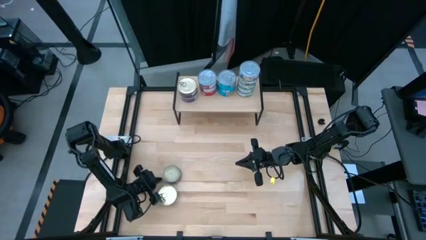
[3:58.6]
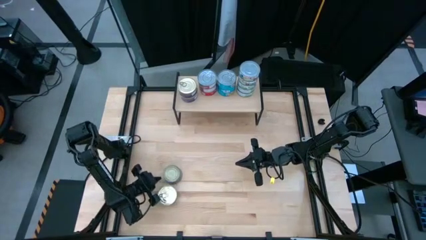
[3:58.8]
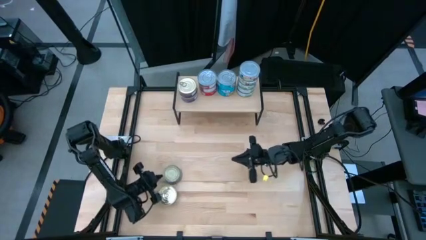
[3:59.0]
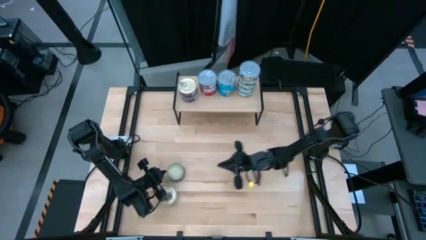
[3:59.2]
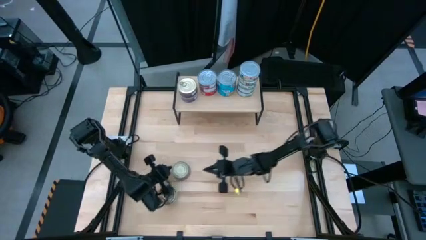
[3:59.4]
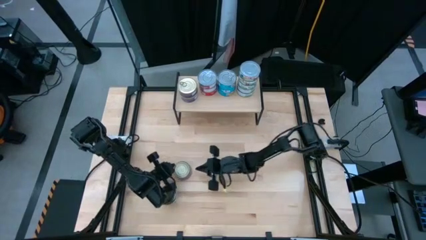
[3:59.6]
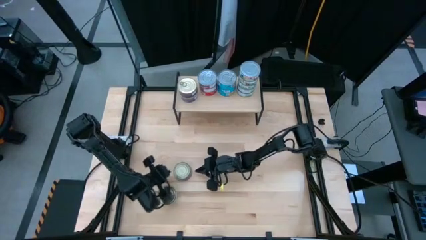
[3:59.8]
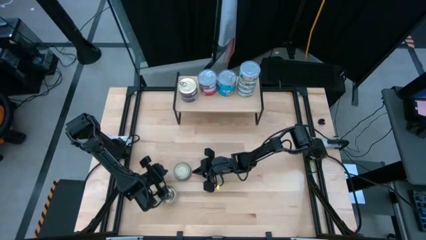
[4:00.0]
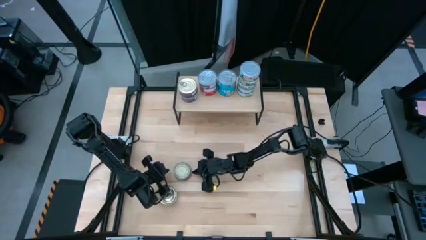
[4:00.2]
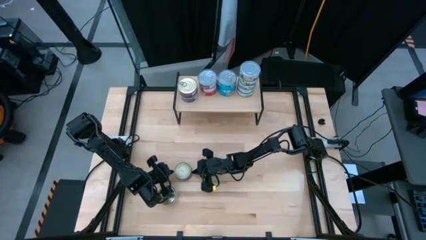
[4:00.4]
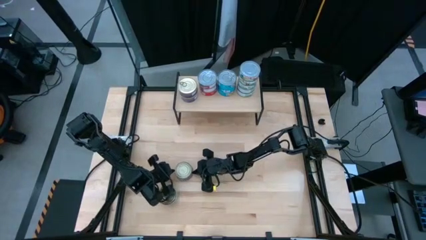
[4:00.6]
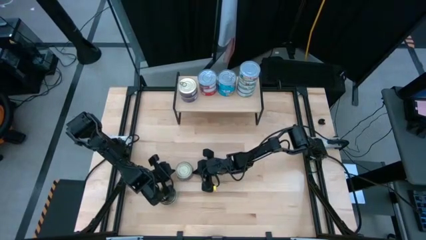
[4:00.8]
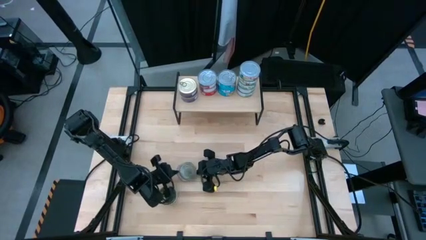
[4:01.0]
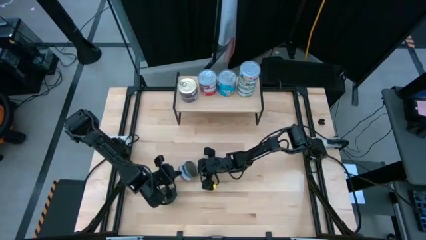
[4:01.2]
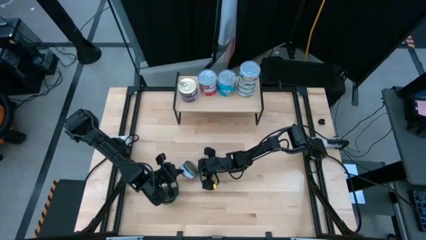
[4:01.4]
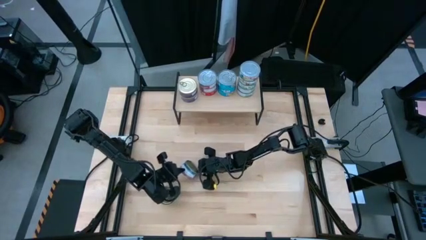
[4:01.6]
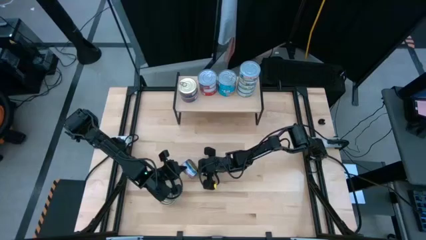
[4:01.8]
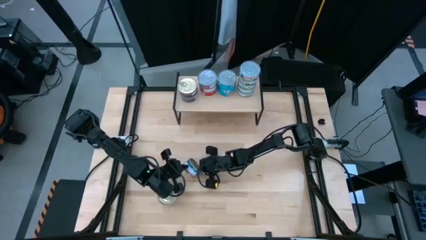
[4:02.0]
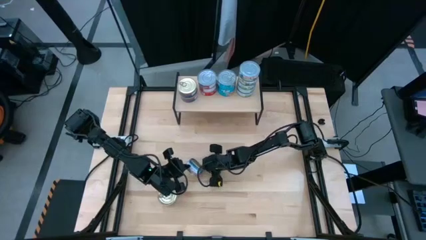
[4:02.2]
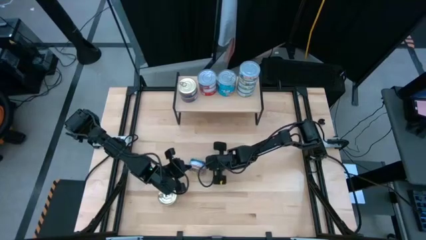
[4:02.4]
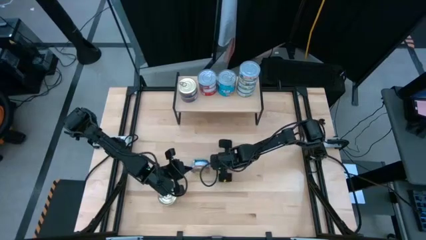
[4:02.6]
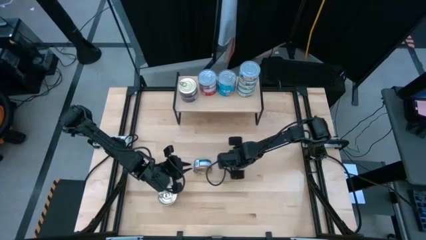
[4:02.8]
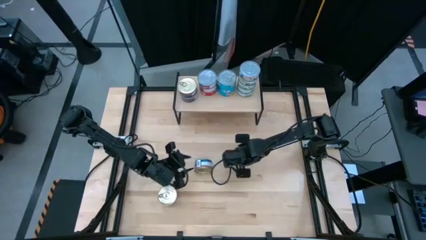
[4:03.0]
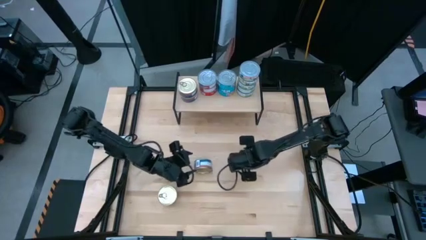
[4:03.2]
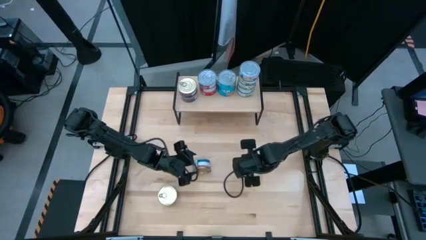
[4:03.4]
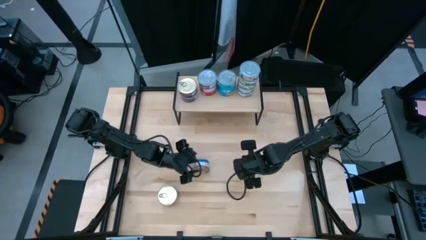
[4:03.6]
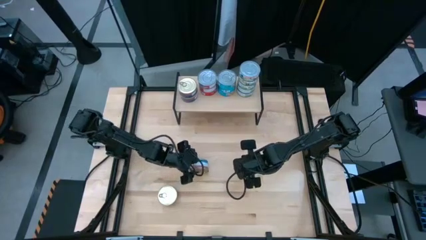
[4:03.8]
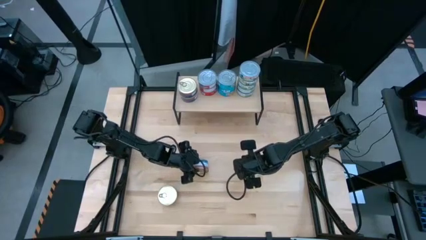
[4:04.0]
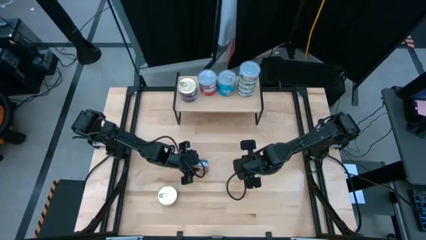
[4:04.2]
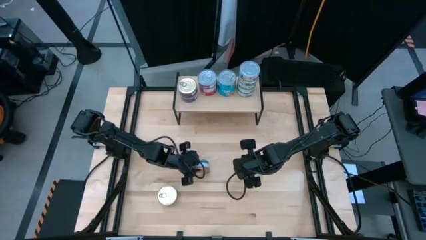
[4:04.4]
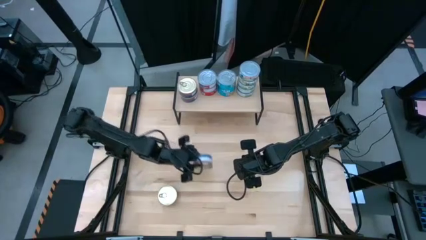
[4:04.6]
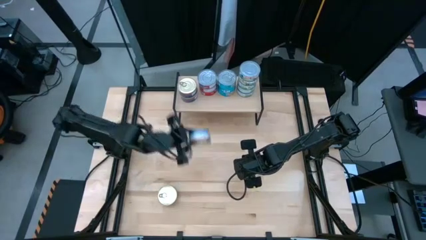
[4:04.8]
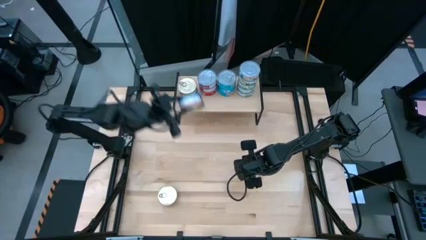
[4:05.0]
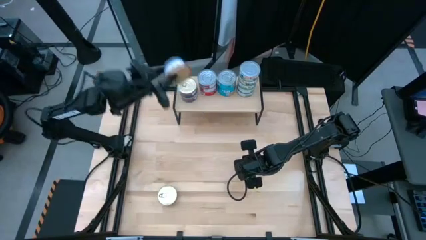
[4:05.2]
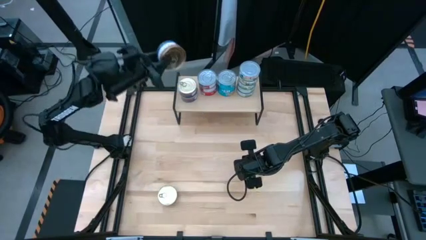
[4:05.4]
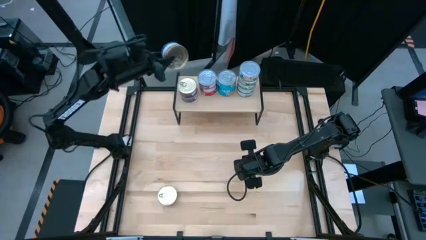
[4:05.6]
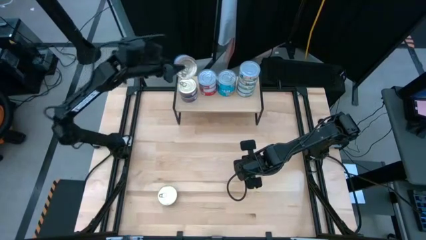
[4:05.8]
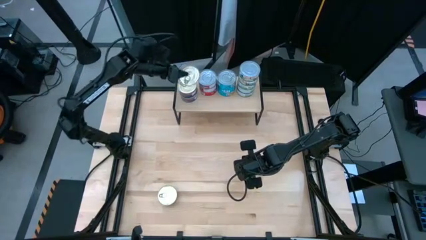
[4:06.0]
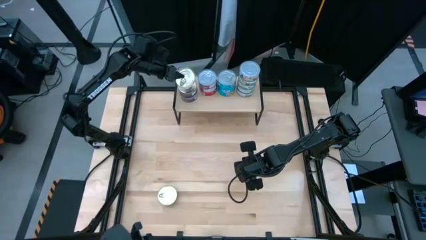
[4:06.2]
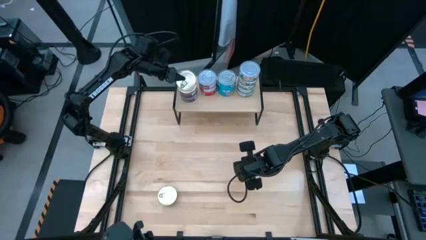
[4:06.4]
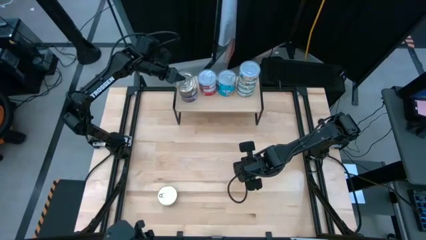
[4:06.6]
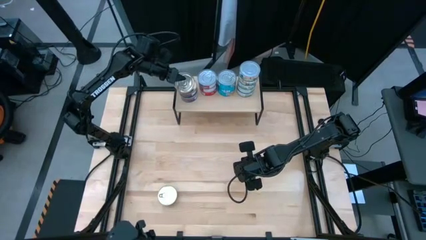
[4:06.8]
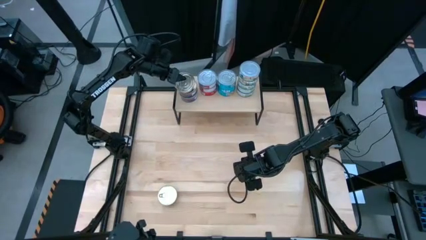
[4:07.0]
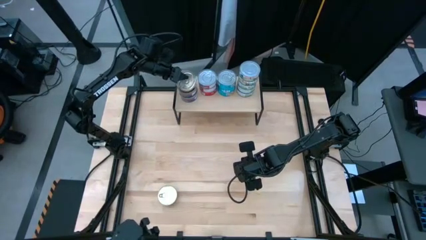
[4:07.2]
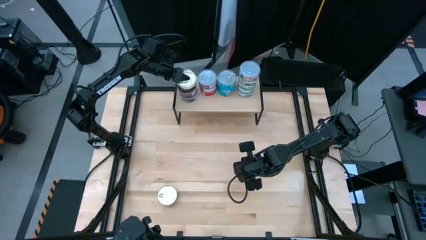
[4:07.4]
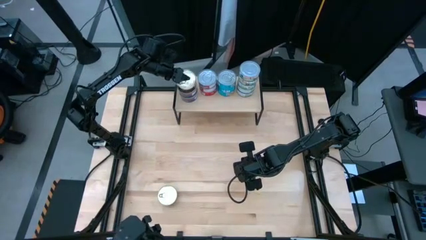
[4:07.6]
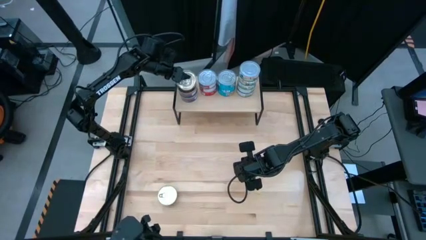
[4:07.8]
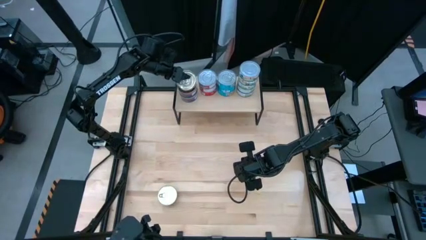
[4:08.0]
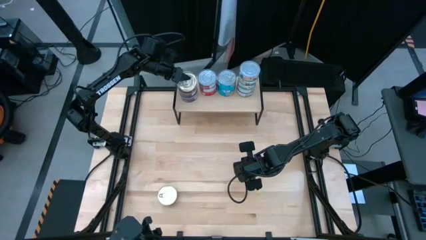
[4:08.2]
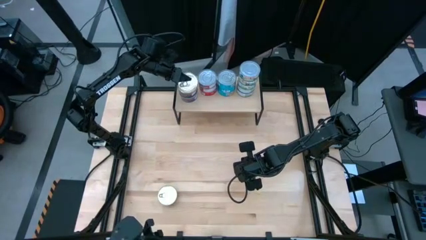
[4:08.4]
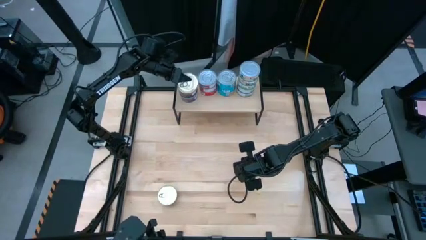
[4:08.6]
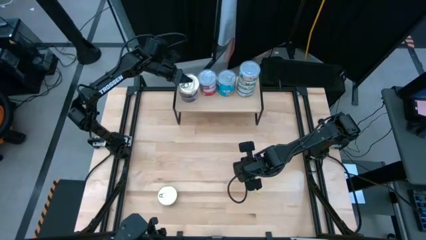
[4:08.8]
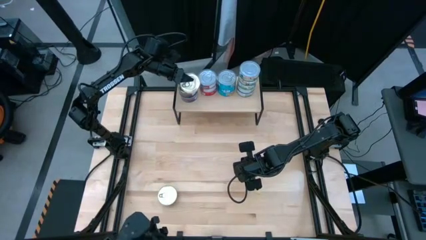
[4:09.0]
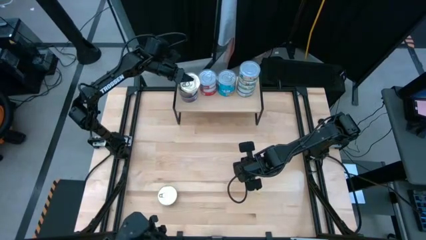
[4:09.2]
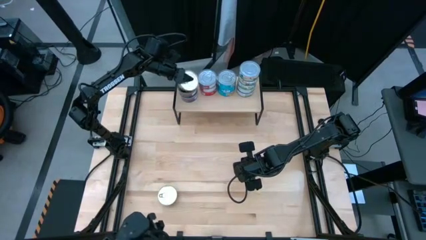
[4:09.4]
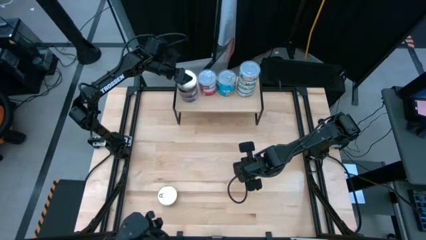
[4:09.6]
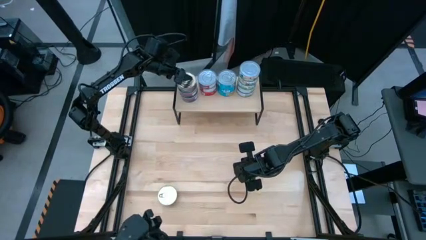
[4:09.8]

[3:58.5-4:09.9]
Task: Stack canned seafood by type on shelf
Stack the blue pink tuna can on top of the other blue tuna cans on the shelf

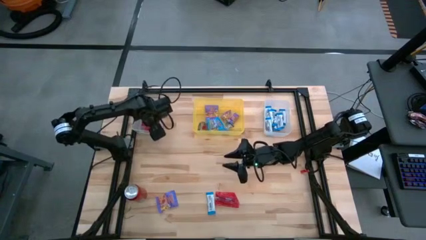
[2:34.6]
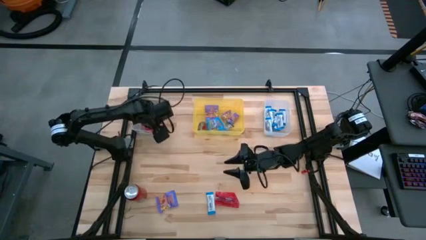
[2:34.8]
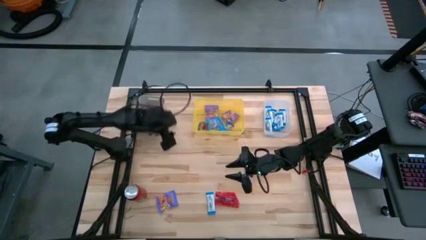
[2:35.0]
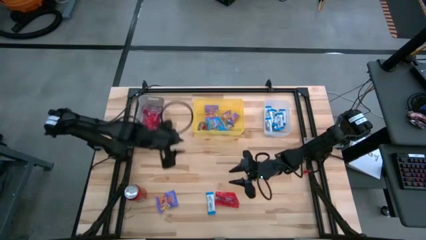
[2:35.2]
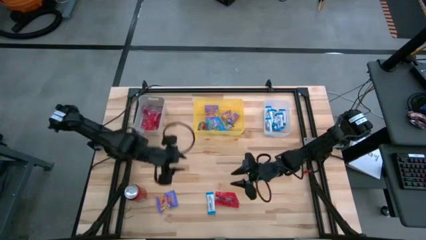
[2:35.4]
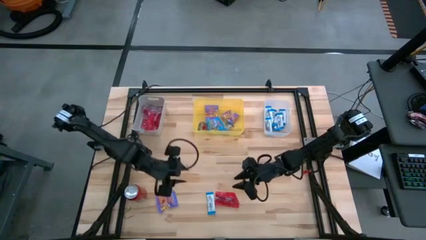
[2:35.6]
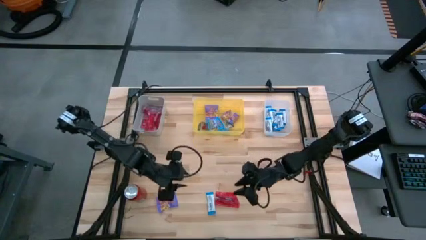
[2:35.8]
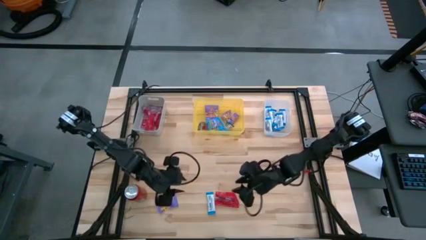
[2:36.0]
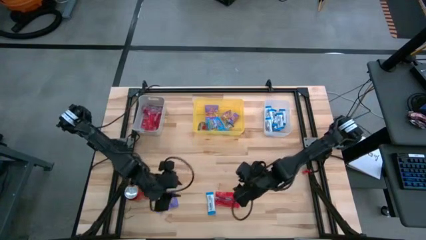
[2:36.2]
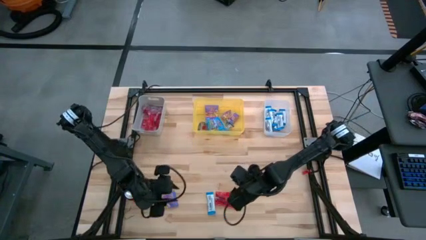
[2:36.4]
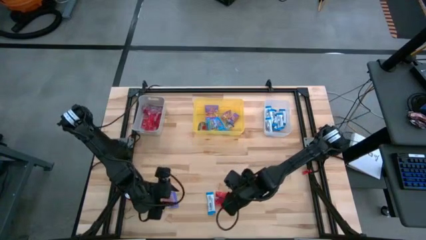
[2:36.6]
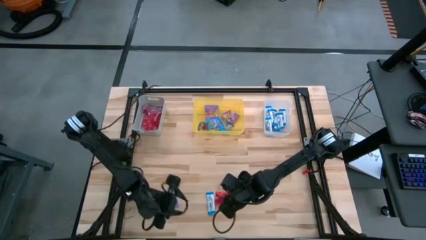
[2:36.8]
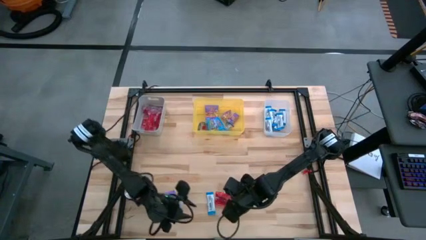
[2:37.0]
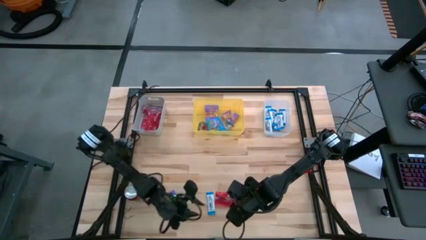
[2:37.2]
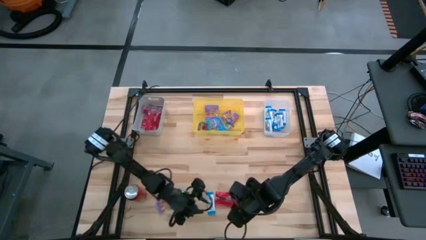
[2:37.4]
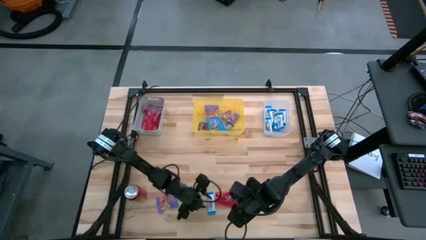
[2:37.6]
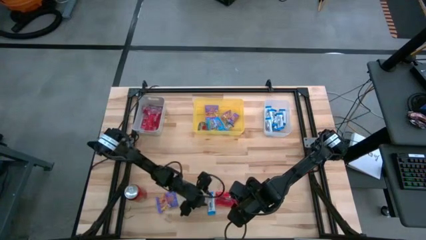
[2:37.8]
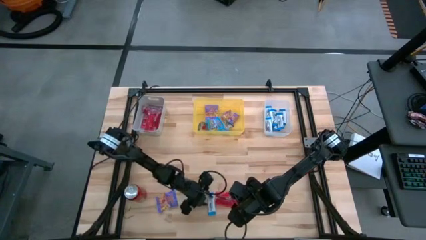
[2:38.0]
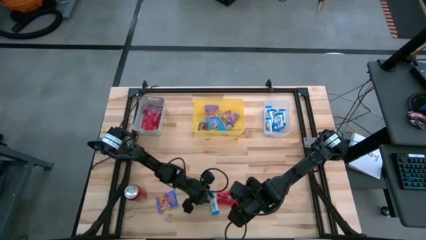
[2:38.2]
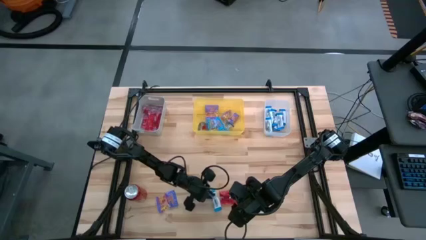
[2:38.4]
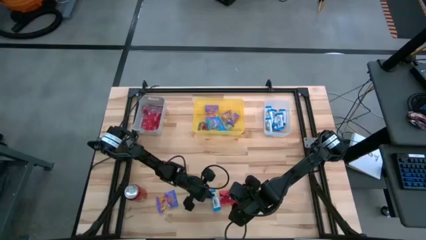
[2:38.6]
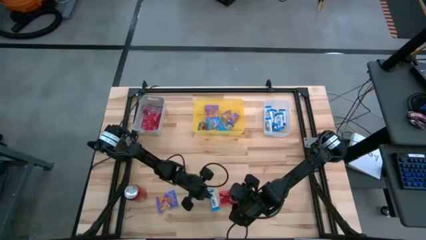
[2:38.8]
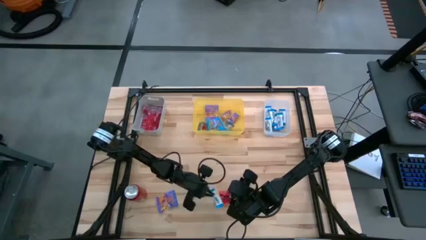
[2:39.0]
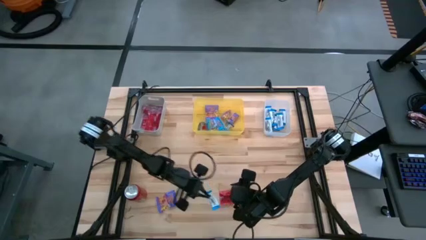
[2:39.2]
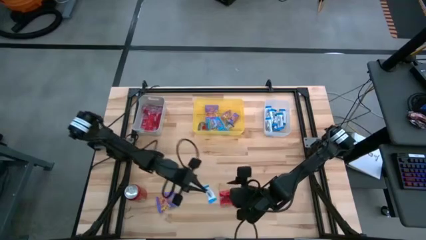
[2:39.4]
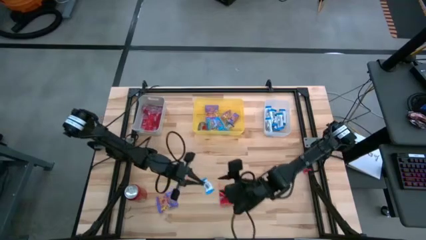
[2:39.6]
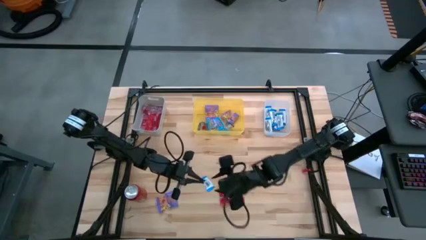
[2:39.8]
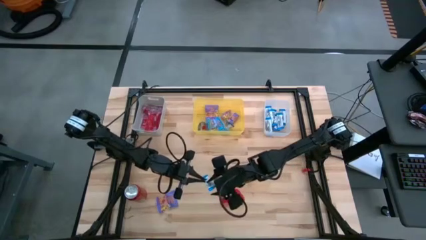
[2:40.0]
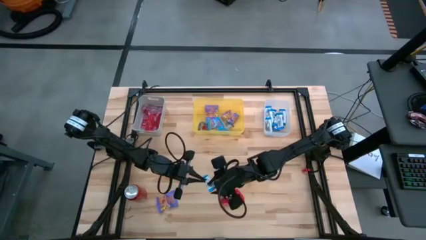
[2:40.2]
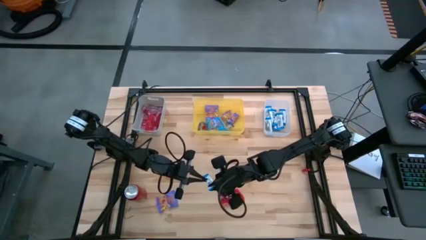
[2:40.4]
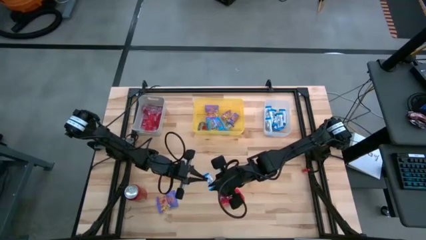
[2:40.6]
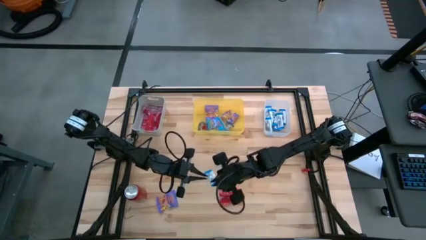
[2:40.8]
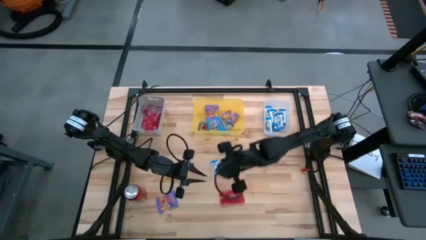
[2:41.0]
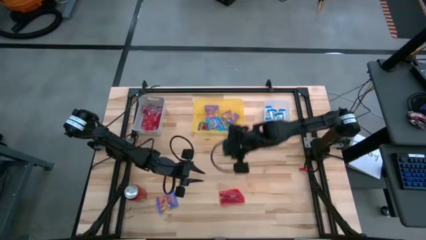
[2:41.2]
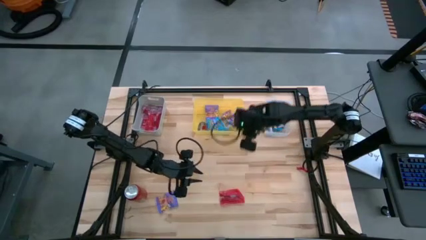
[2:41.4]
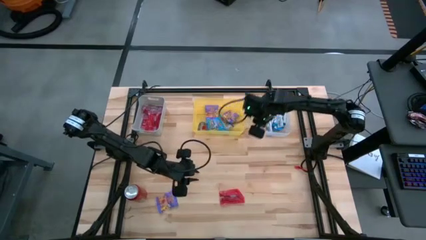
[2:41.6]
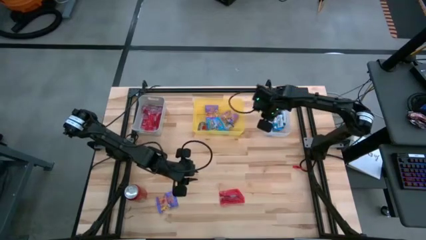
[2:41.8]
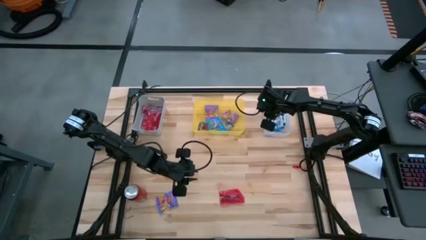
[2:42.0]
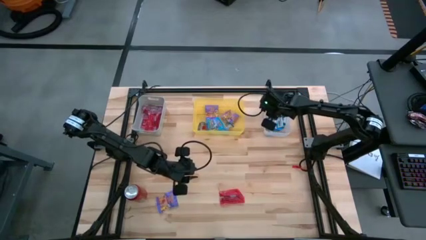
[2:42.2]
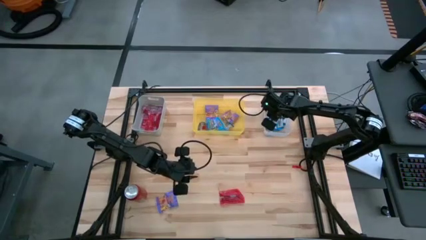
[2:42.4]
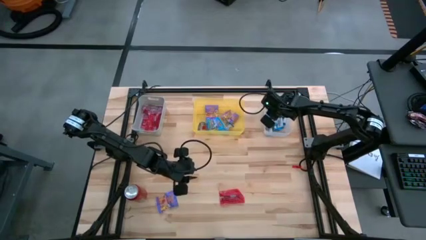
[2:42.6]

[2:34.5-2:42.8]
Task: Sort candy
Put the white chocolate into the transparent bin
